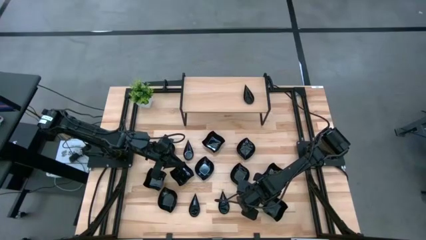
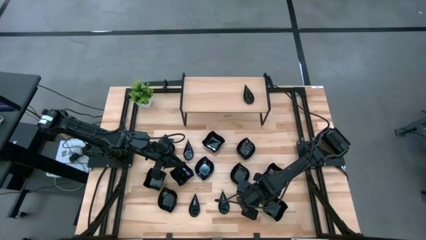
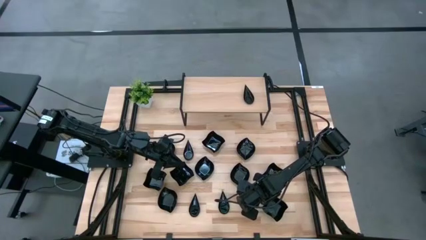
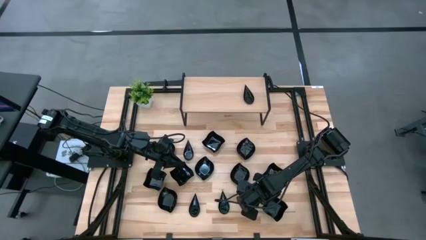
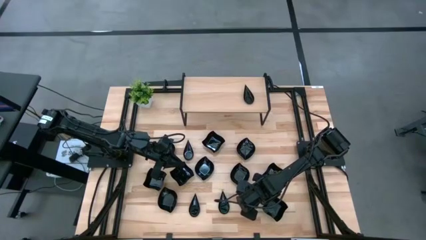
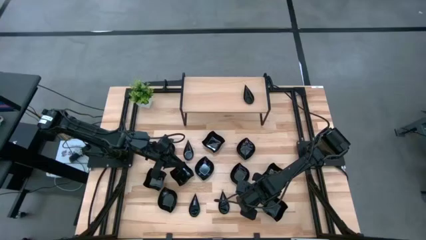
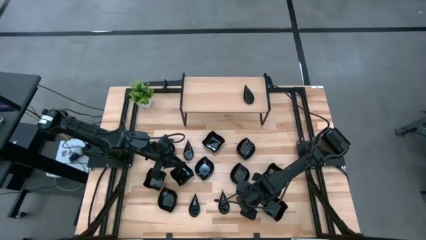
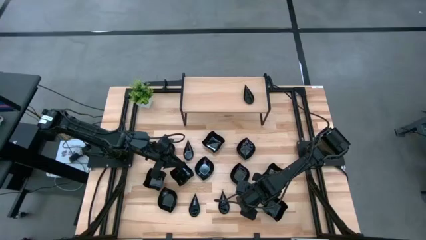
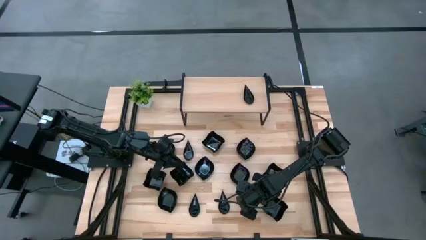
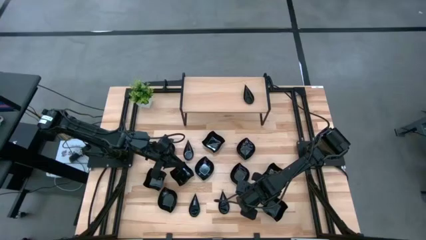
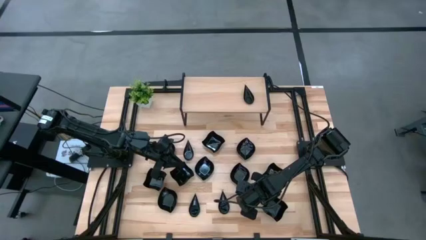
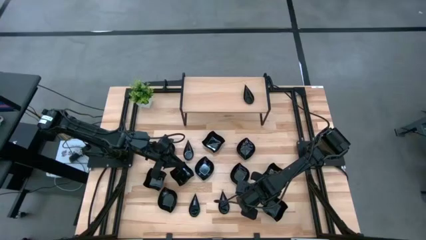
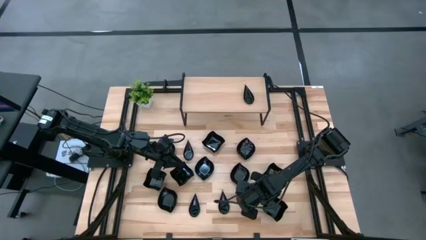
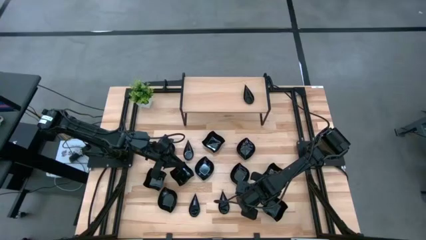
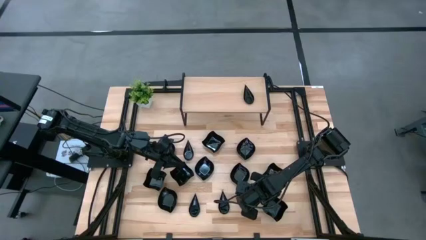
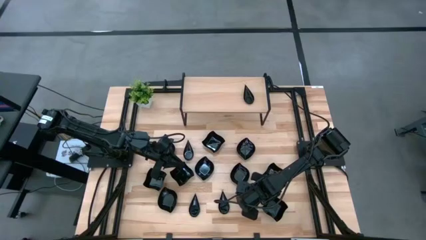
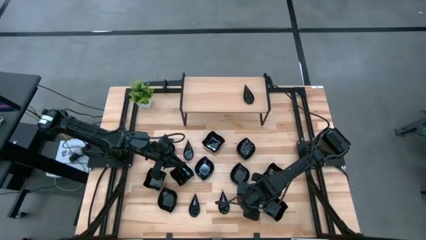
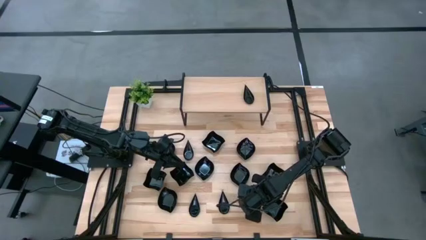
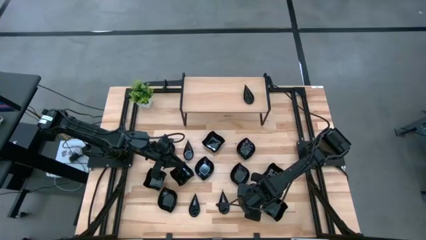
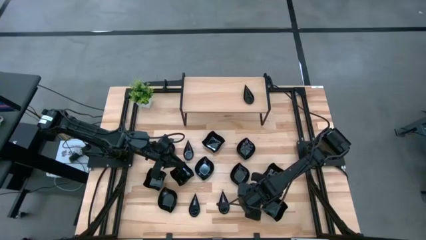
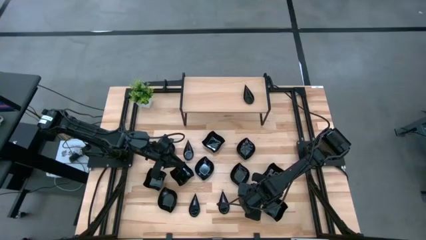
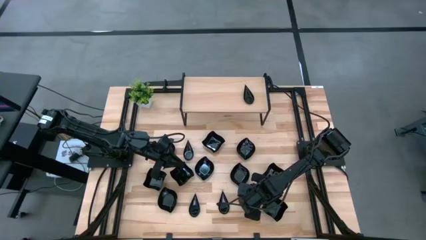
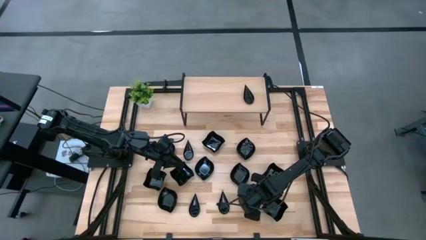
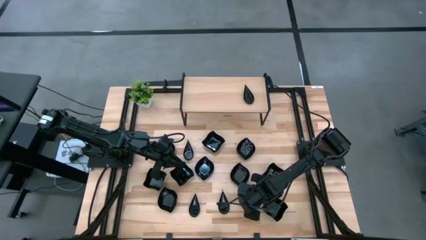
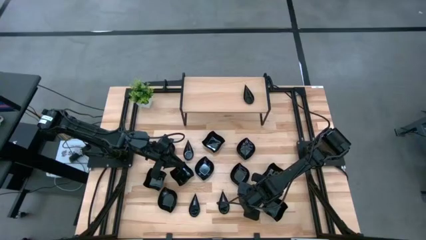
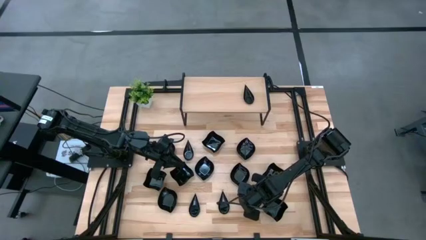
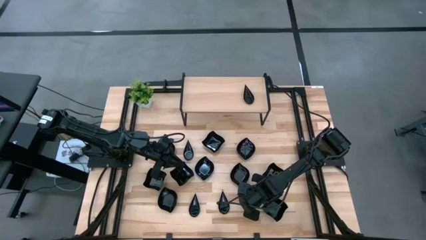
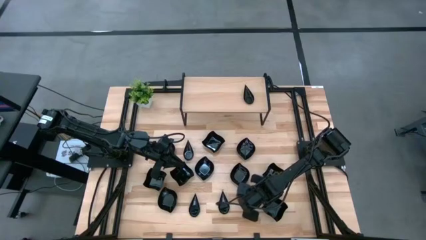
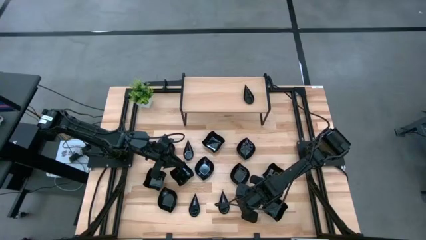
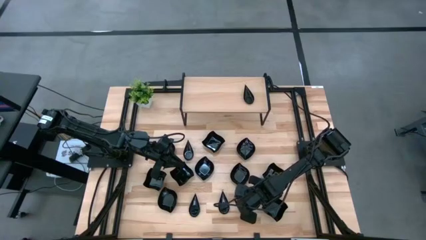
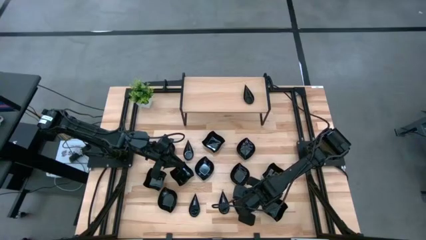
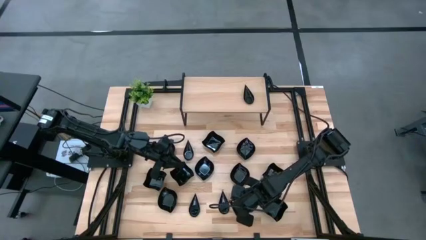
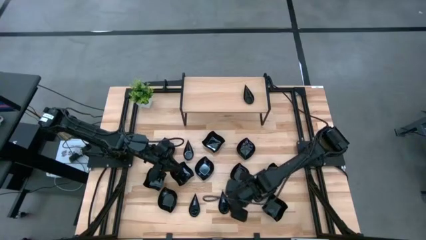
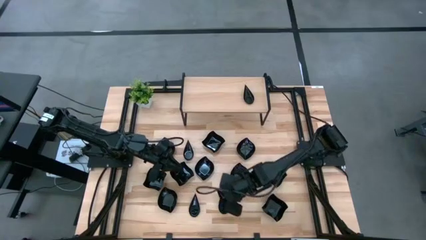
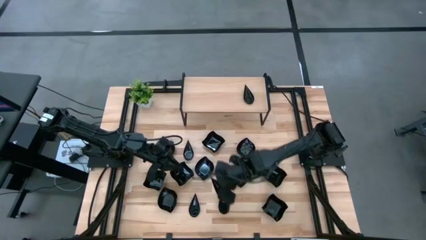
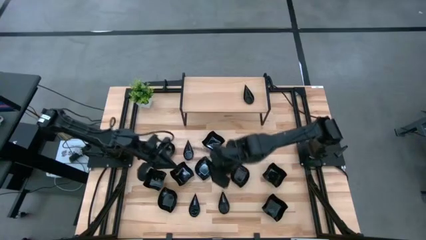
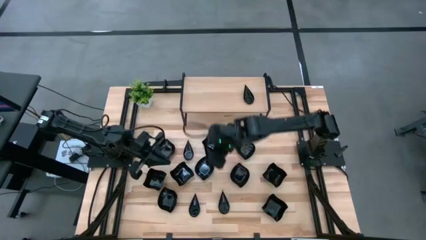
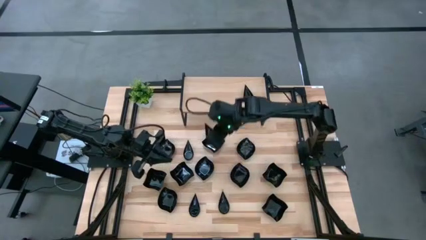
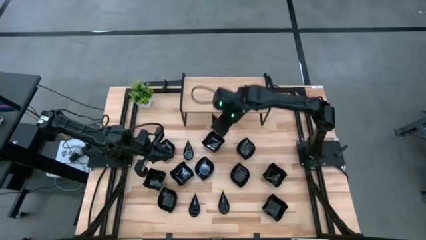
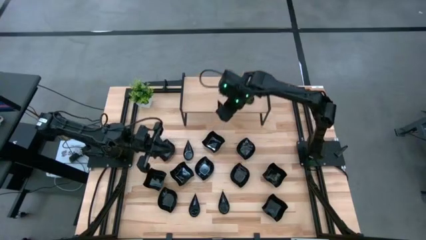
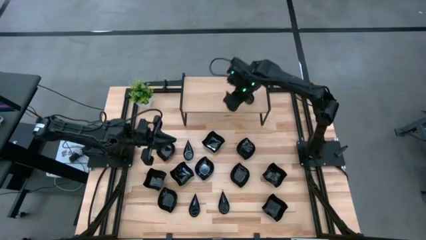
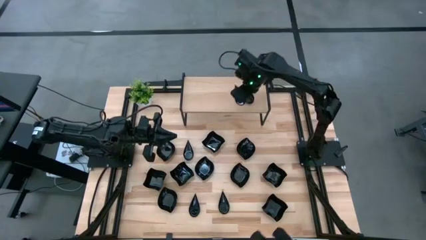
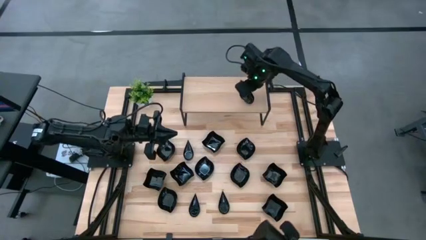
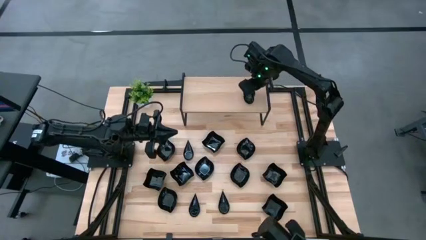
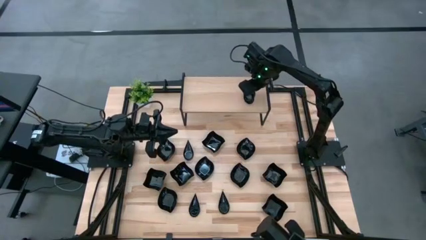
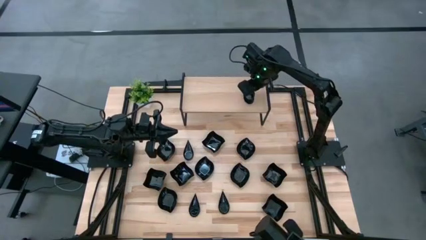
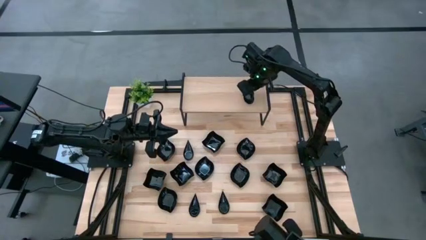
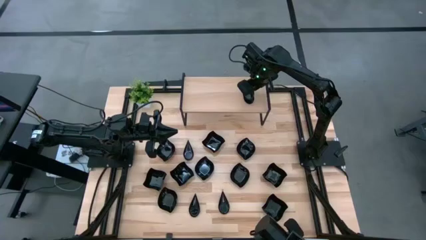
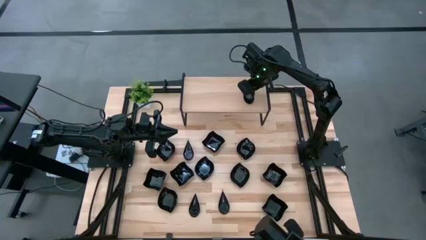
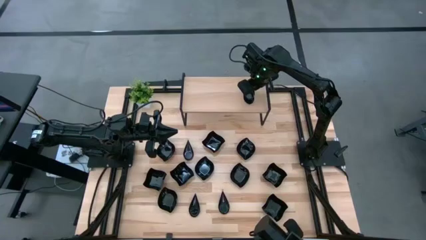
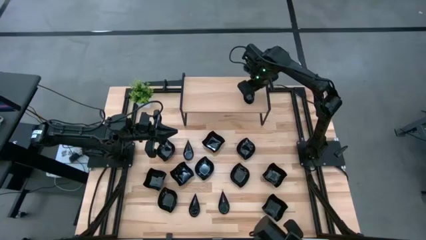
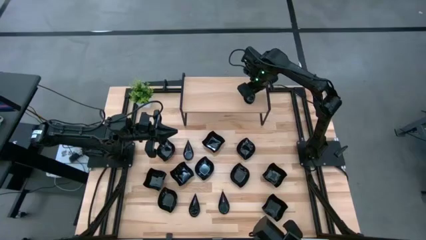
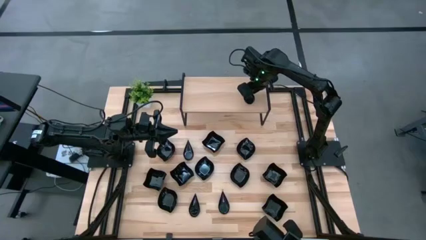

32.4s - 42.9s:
Task: Pick & Place Mini shaped plates
Stack the black drop shaped plate on top of the black drop shaped plate on the shelf
